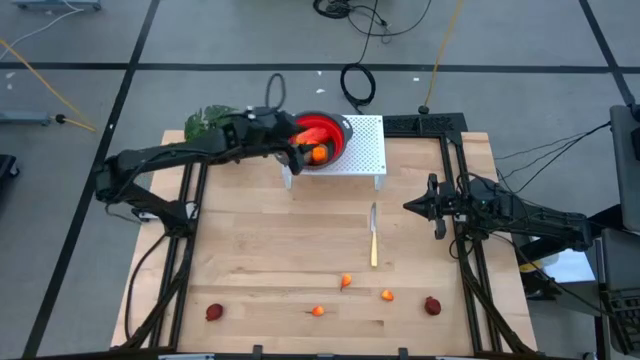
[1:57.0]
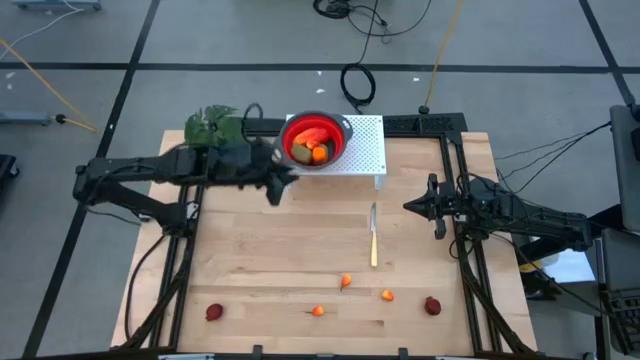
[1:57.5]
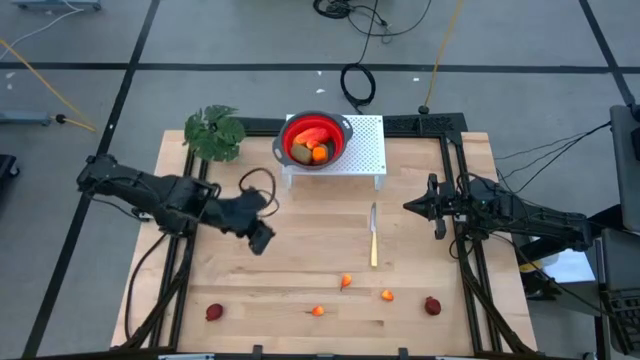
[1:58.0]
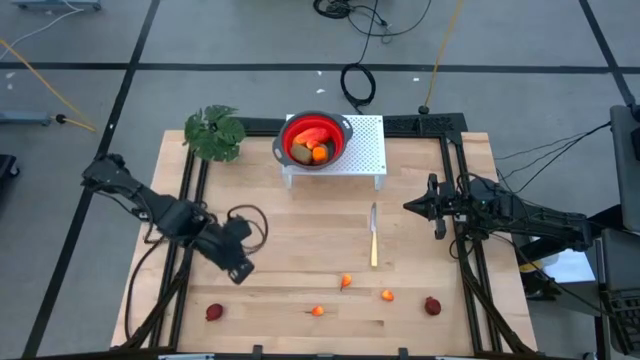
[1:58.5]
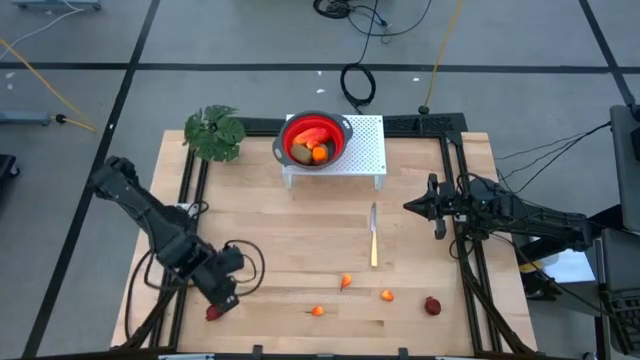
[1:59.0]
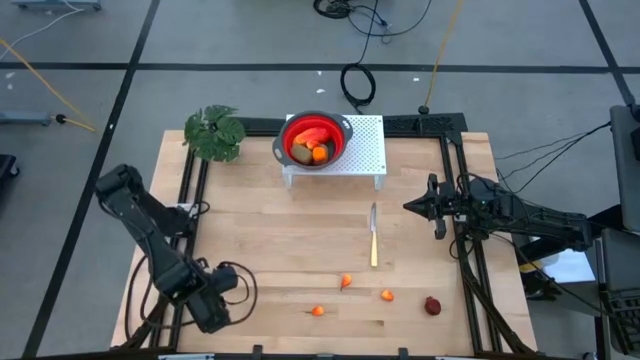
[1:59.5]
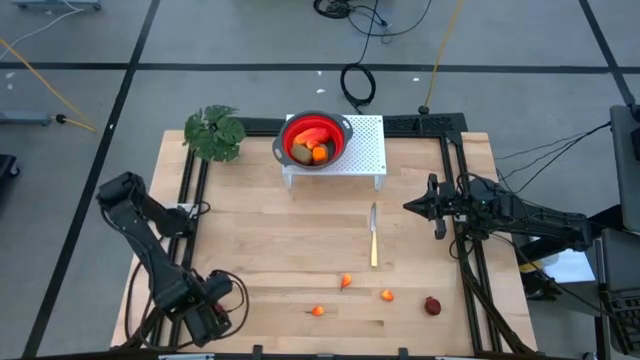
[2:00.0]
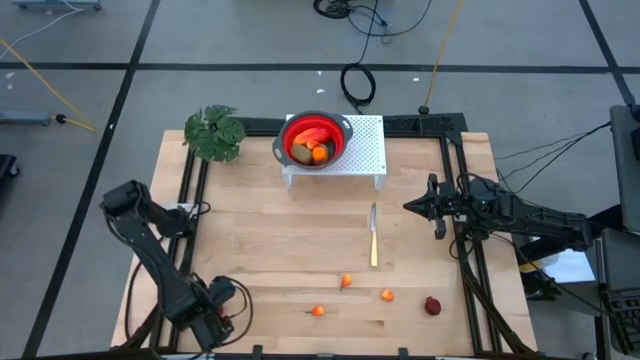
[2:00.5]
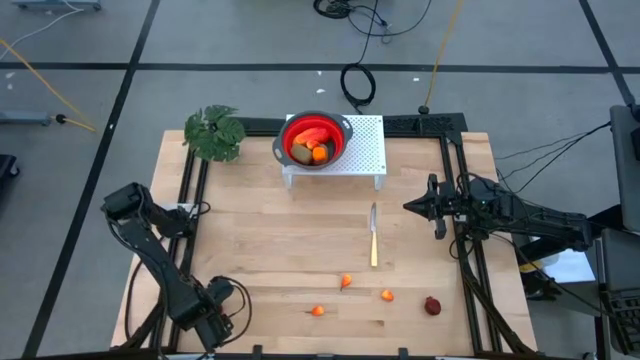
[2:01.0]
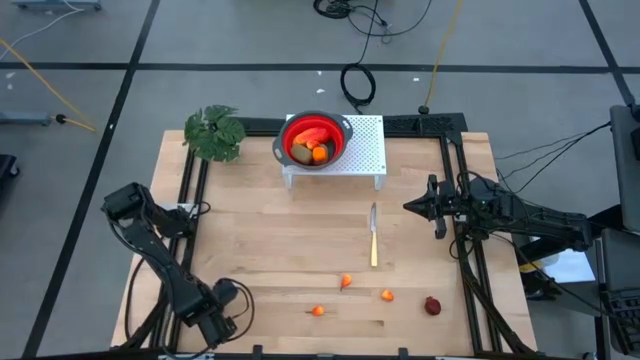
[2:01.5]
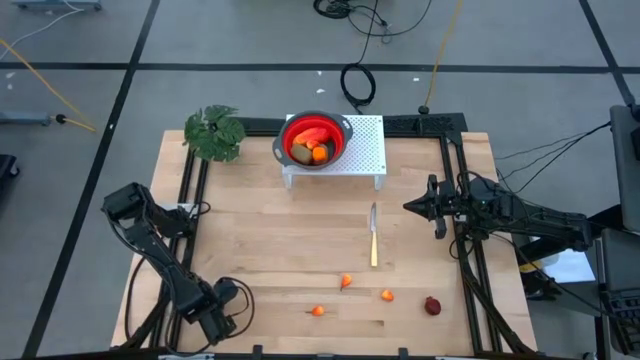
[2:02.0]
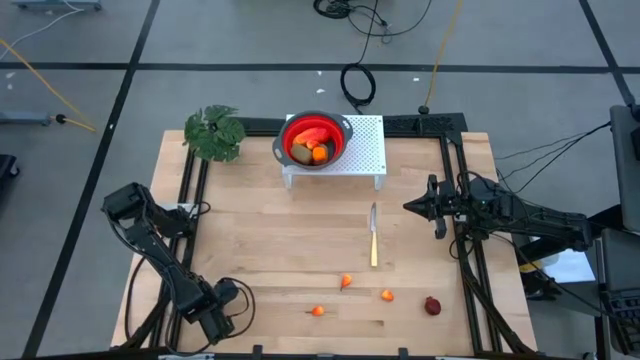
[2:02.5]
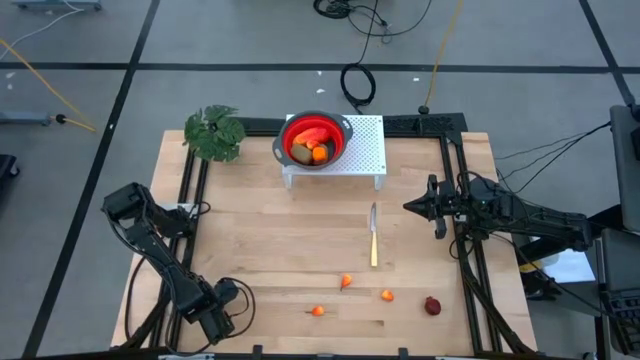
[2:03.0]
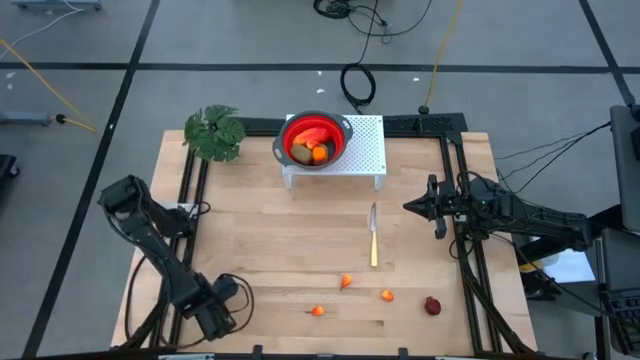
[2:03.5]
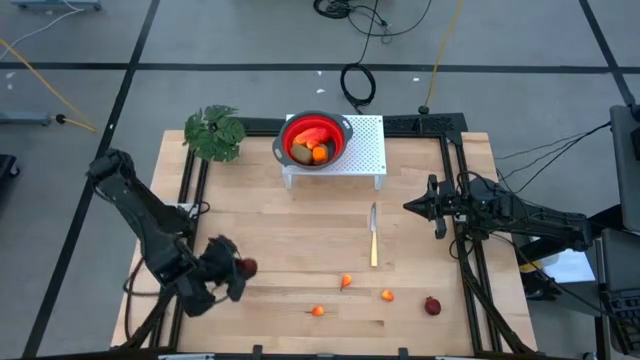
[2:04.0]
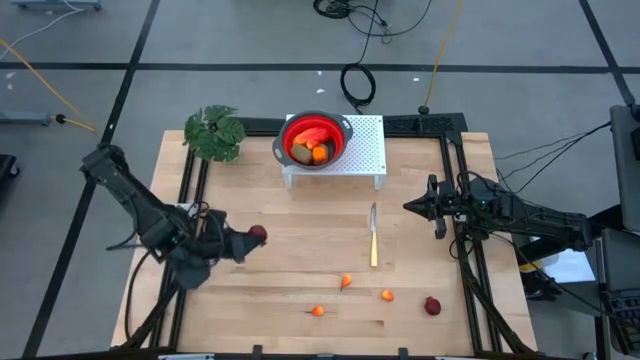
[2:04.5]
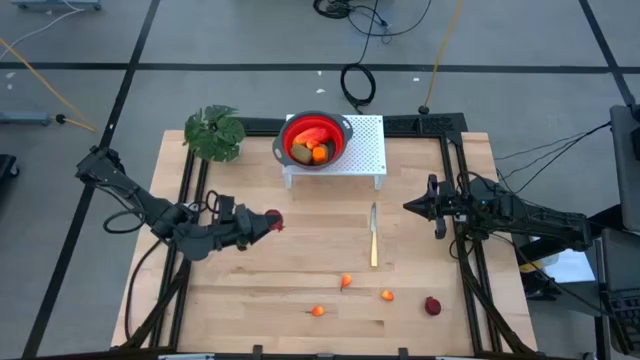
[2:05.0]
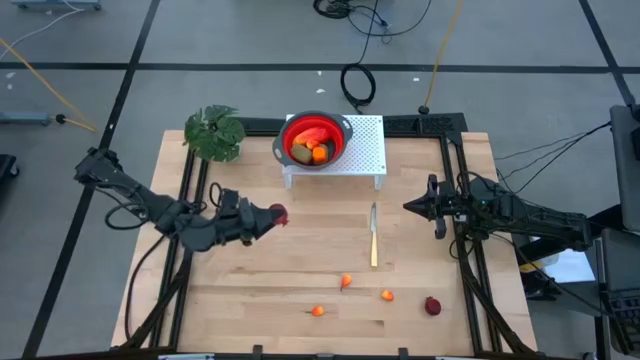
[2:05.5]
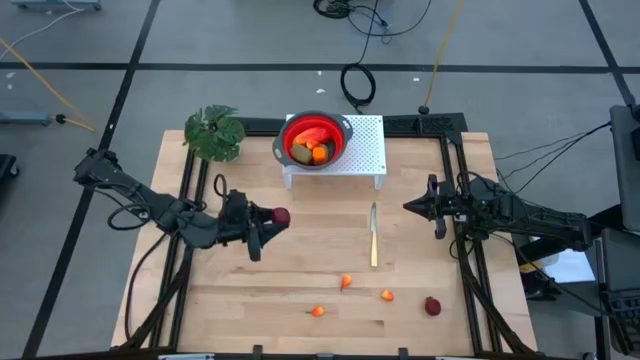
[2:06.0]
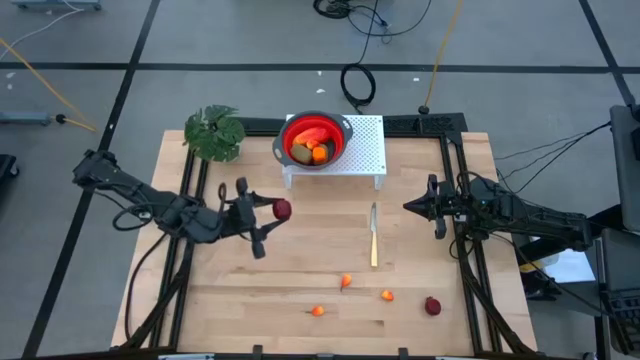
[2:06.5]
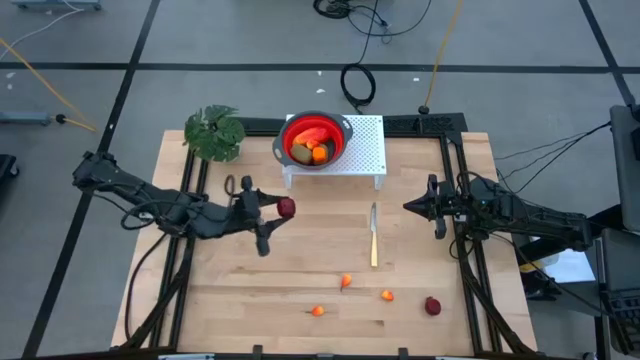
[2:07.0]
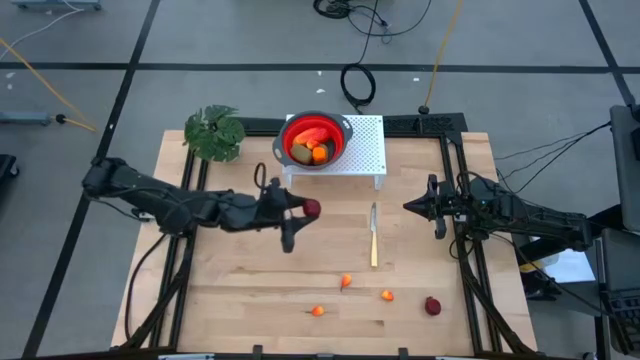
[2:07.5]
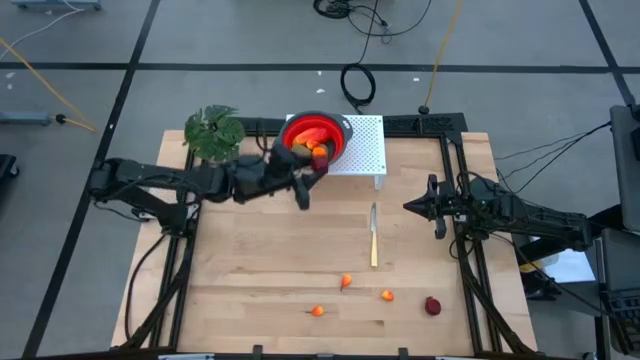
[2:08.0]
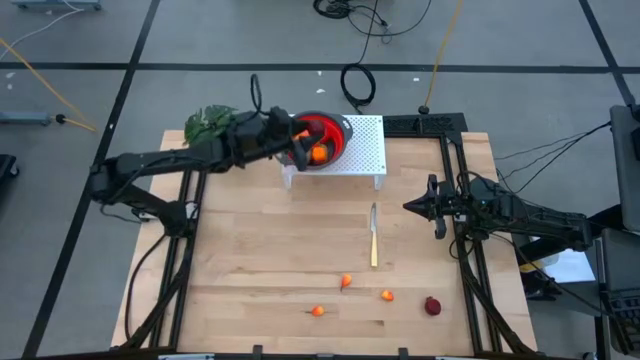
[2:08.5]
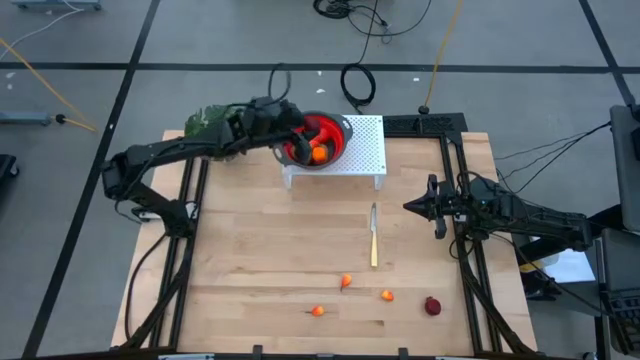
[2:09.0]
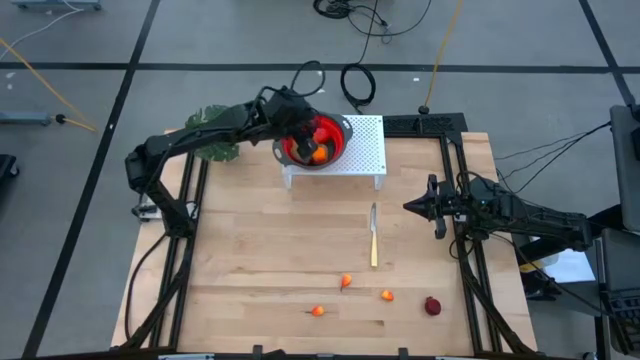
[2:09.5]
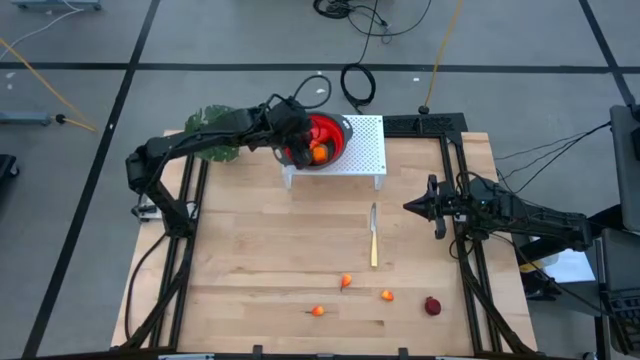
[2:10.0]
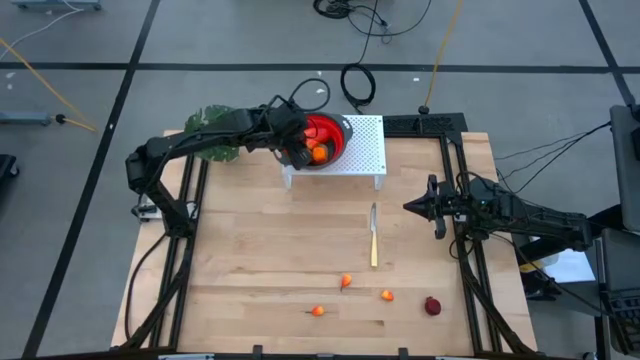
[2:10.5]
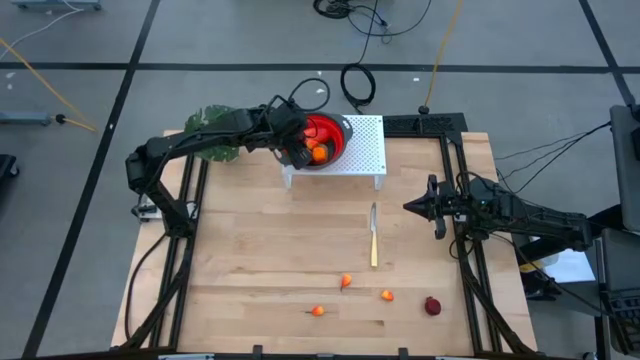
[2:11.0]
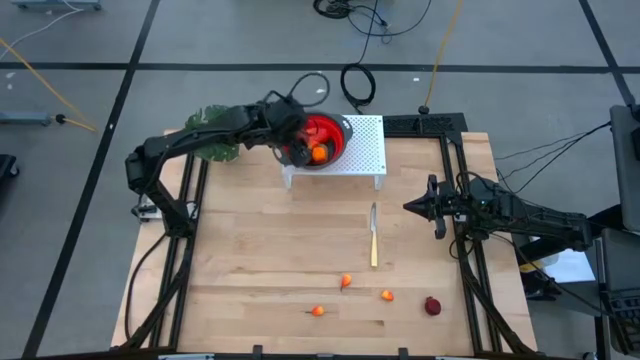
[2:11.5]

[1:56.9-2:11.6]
Task: Pick & Place Fruit
Put the left red pomegranate into the red strainer bowl on the shelf

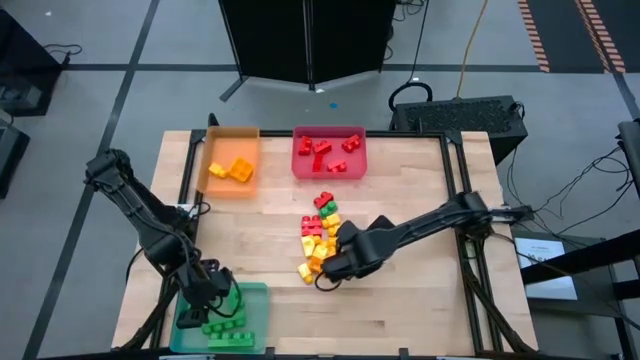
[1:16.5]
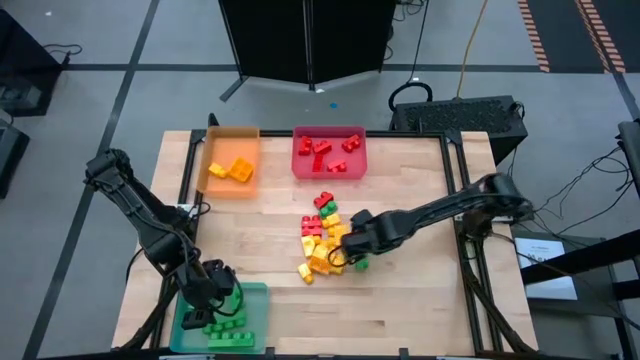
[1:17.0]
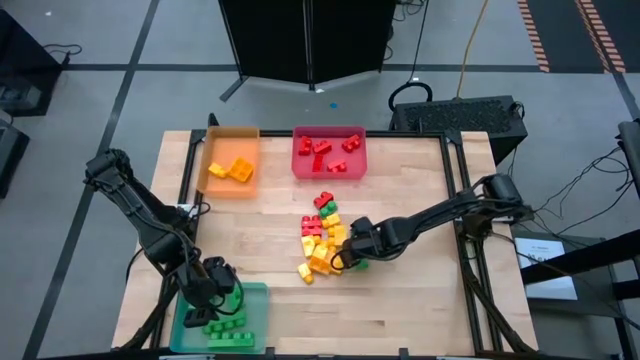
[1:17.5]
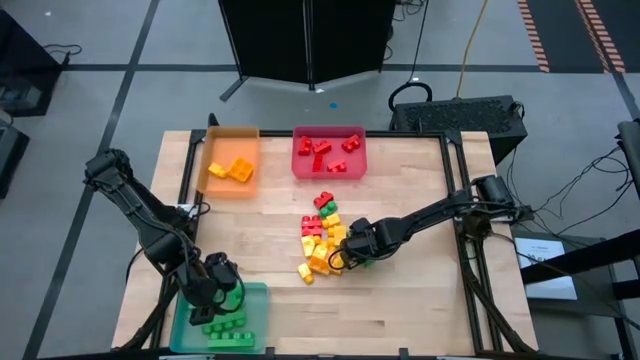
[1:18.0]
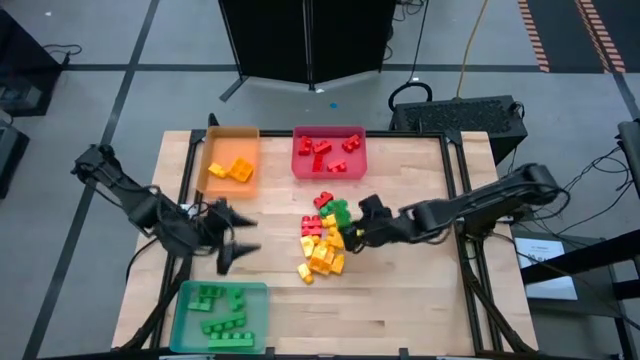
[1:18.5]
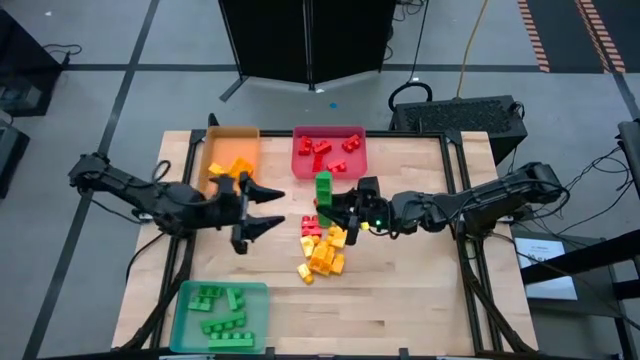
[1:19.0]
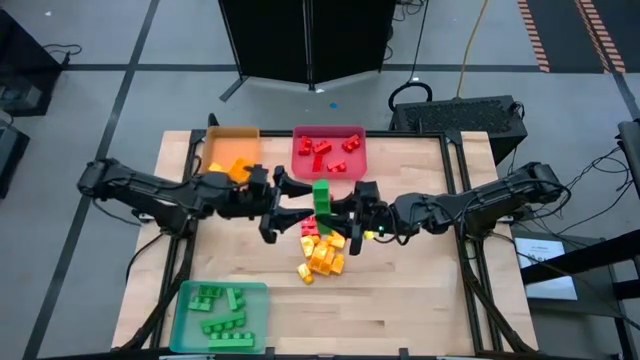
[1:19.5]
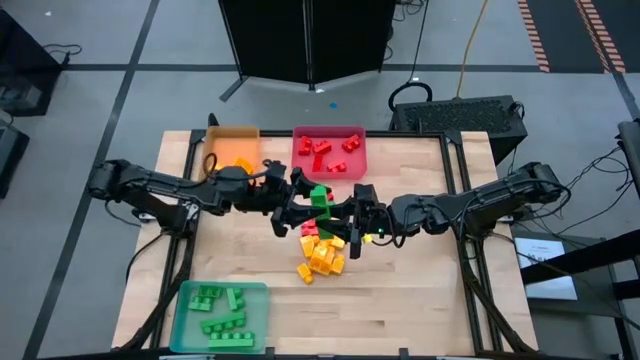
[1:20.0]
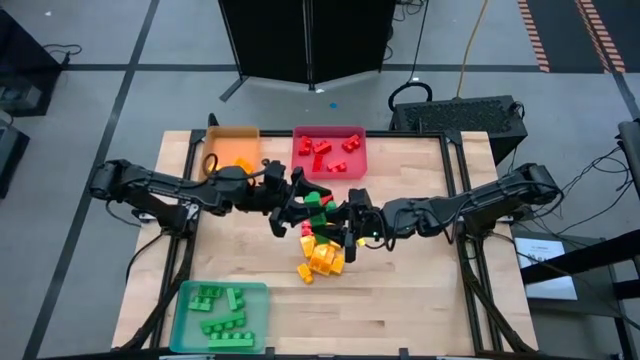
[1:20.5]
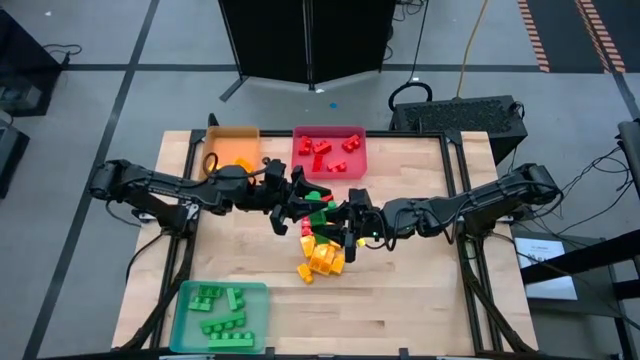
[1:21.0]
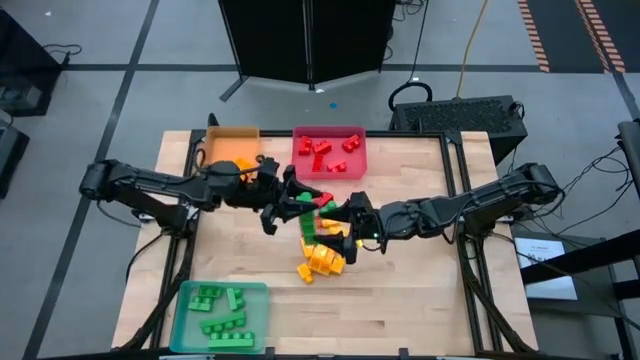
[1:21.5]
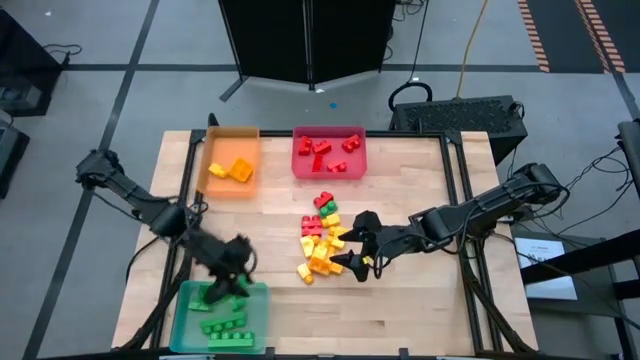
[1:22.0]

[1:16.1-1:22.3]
Task: Sort blocks
Put the green game piece into the blue bin
